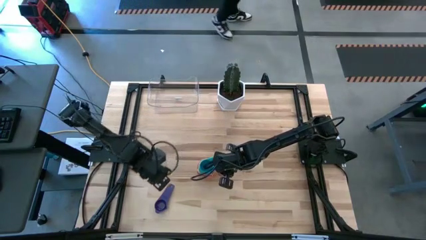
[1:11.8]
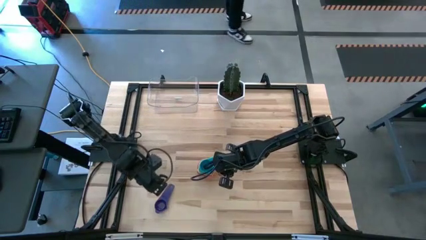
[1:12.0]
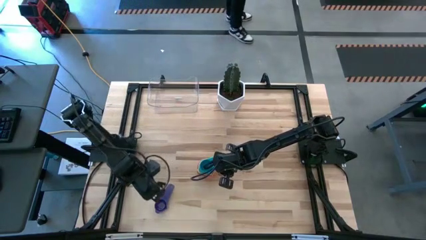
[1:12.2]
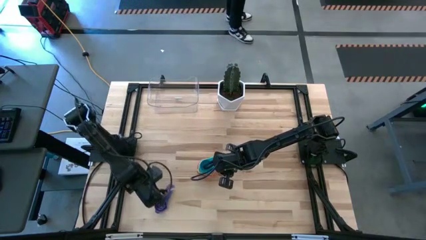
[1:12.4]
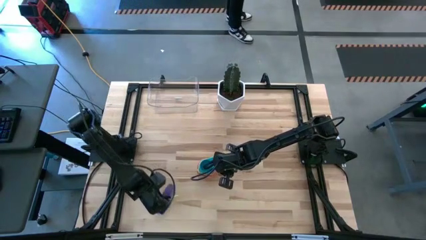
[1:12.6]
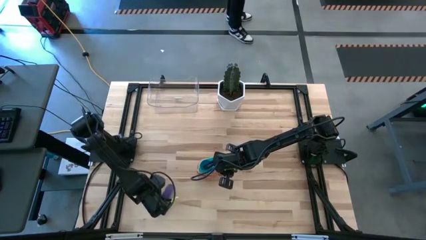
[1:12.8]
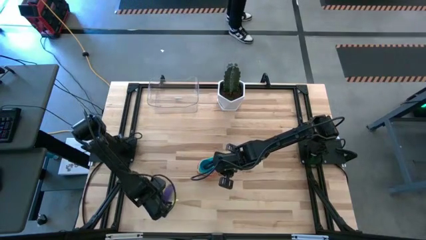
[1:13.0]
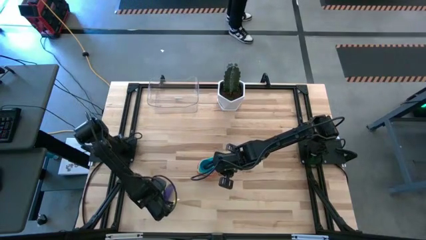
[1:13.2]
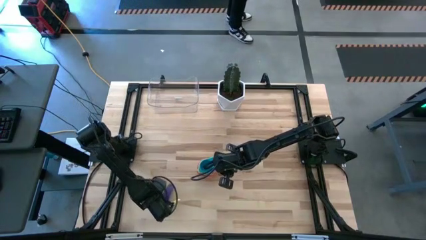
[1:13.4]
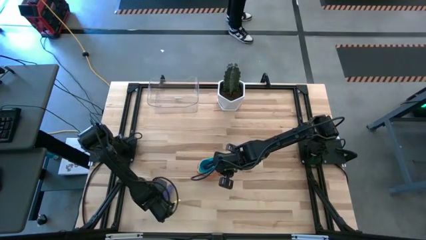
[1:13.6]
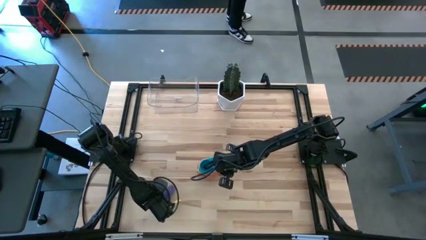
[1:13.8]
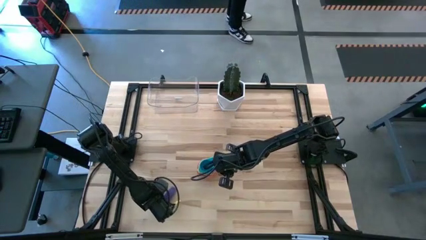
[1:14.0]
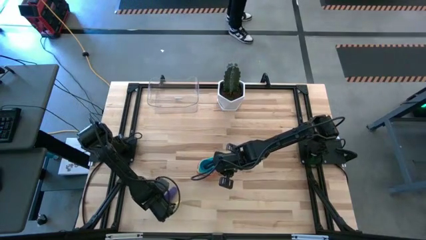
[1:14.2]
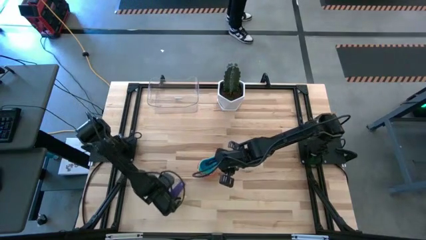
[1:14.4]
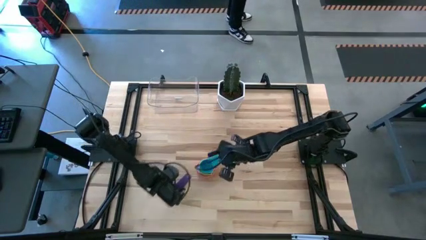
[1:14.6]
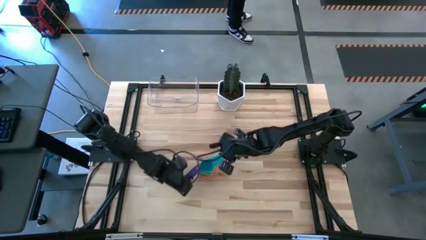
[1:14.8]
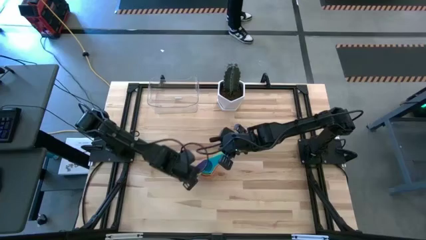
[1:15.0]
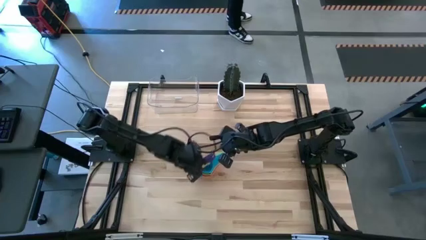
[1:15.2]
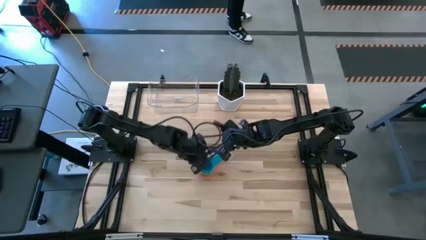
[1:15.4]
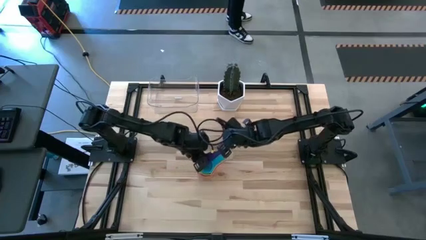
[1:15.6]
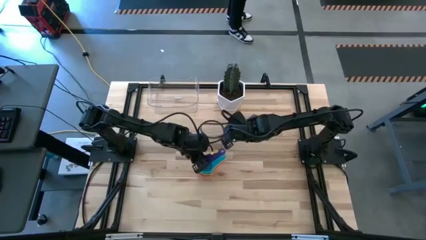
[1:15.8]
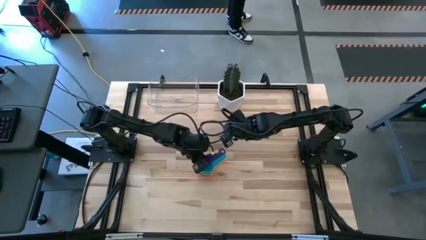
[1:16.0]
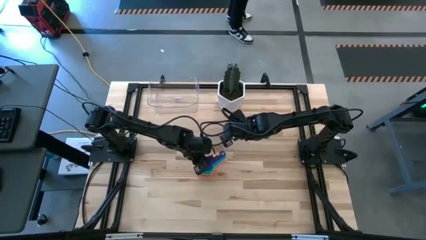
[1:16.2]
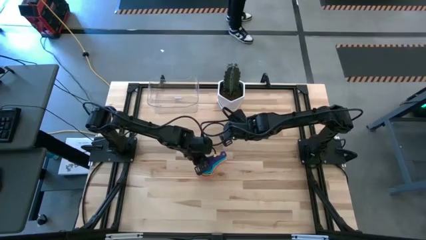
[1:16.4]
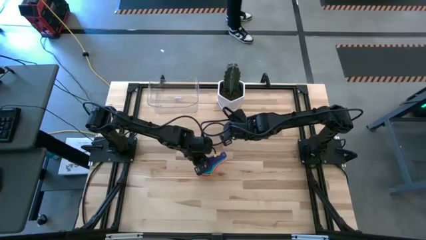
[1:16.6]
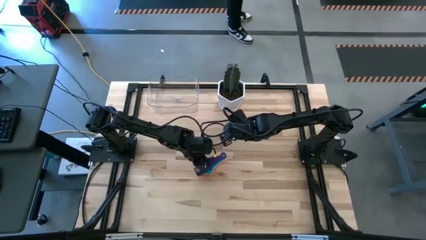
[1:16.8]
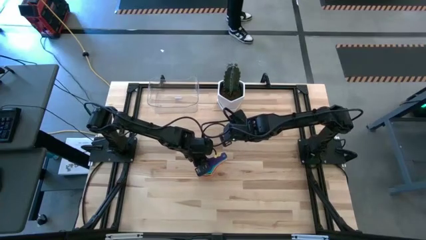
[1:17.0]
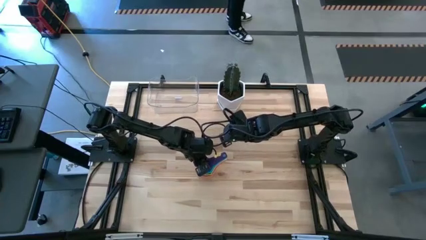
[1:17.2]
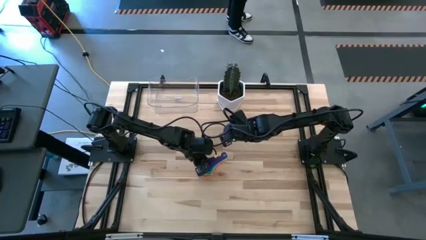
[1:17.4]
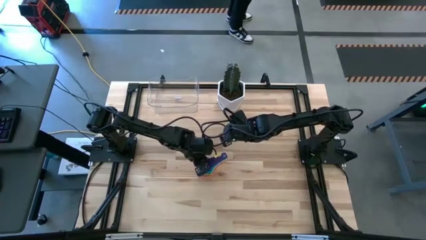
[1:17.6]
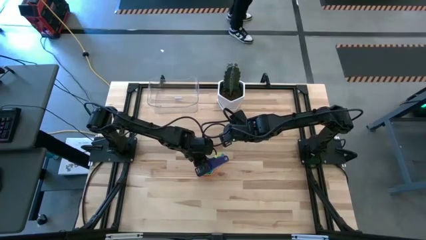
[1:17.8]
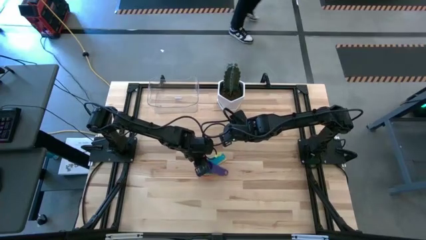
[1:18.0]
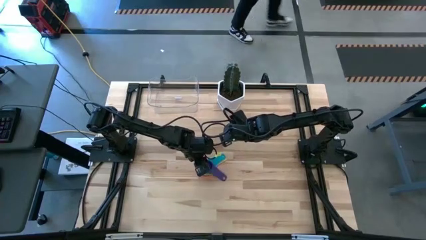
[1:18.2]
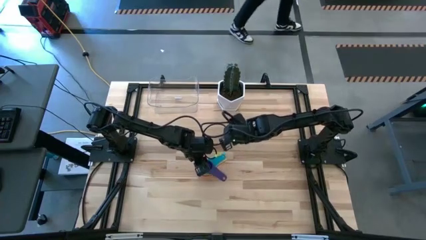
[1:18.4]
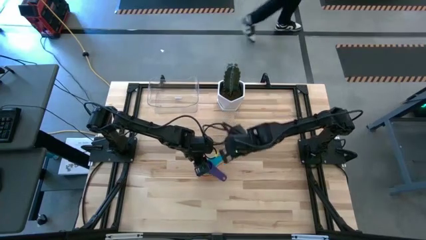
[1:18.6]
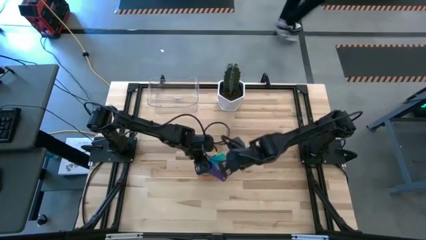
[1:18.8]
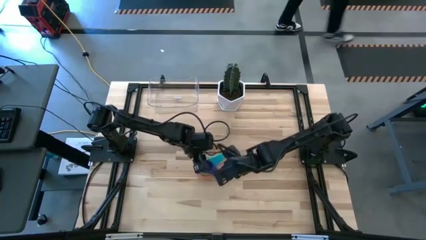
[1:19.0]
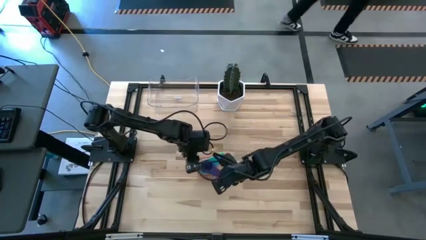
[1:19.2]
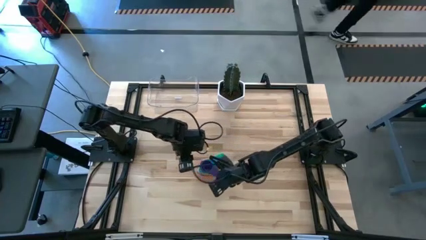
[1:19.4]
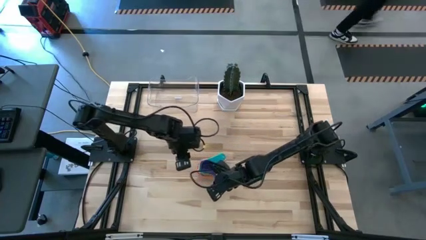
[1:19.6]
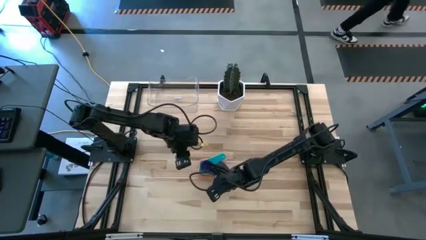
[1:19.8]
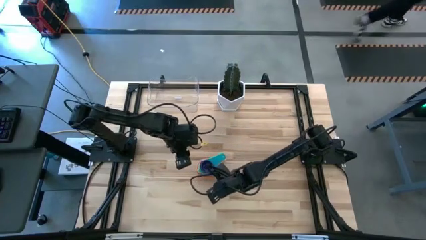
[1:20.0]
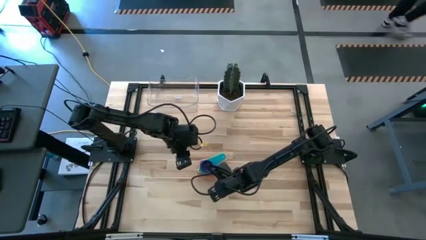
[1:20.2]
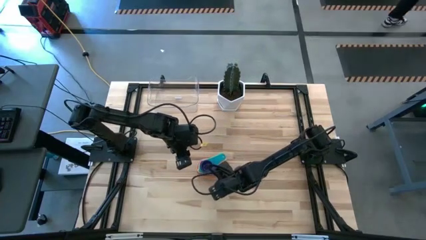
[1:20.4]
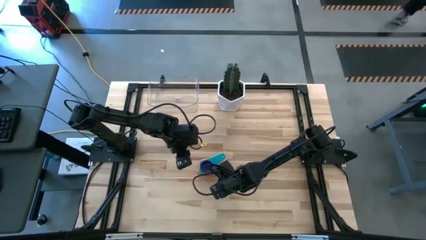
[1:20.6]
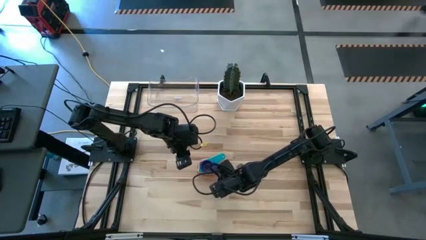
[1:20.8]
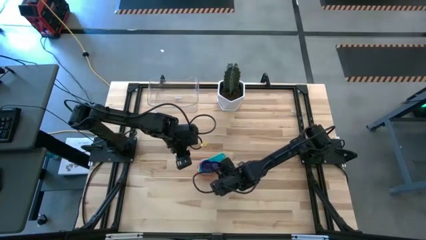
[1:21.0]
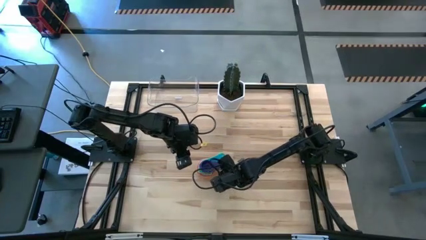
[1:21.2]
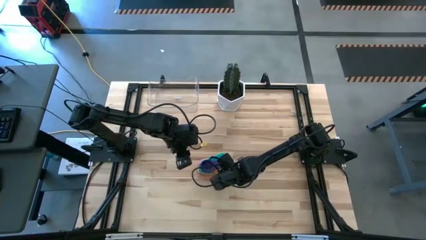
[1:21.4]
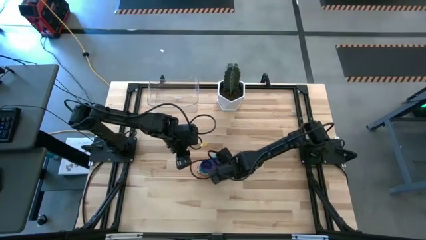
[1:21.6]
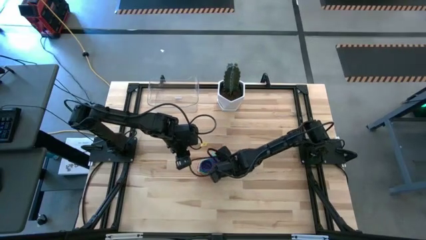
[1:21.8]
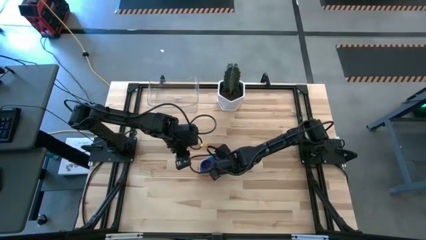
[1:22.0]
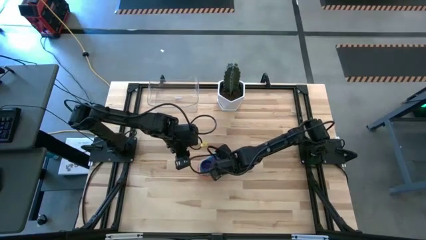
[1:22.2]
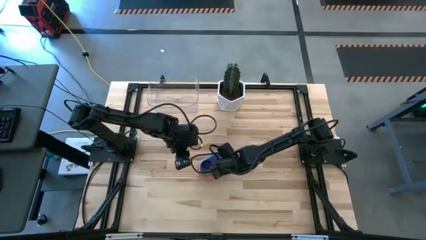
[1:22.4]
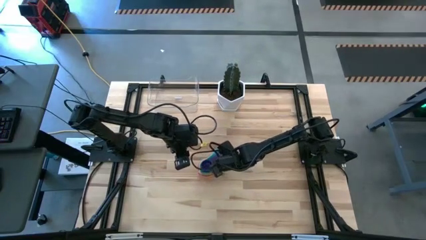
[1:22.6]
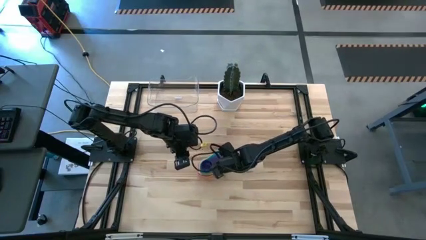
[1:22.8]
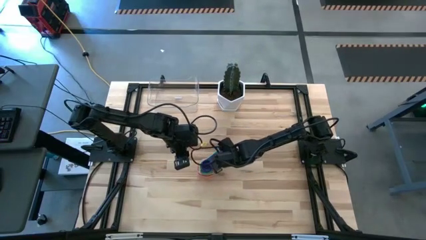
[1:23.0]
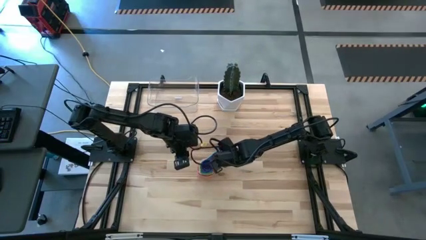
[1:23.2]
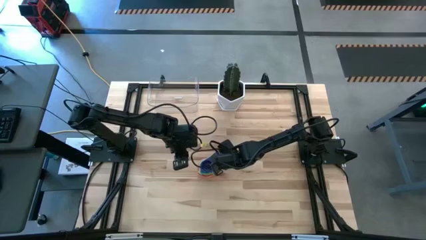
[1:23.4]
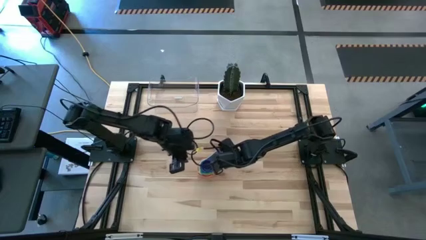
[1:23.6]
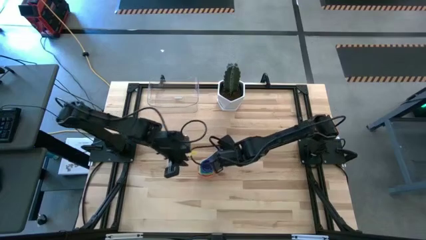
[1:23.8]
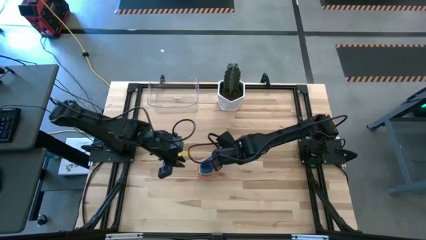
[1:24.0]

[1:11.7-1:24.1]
Task: Nest measuring cups in basket
Stack the small dark blue measuring cup on top of the light blue measuring cup

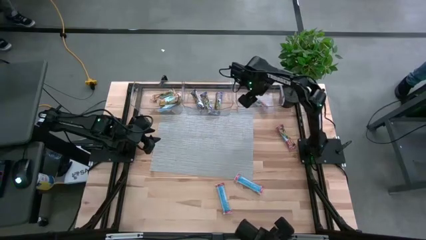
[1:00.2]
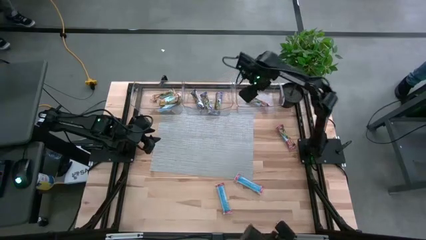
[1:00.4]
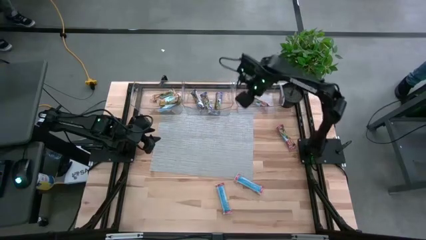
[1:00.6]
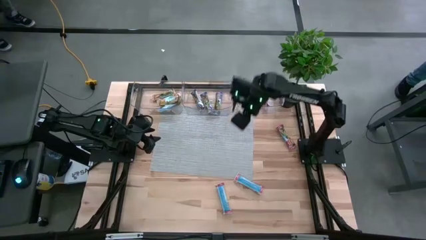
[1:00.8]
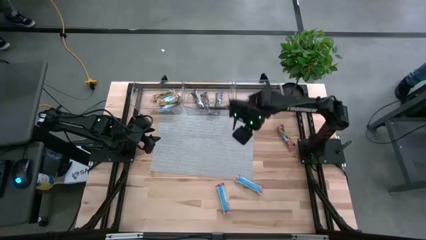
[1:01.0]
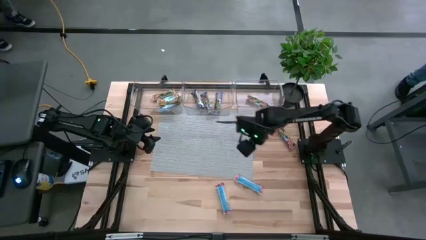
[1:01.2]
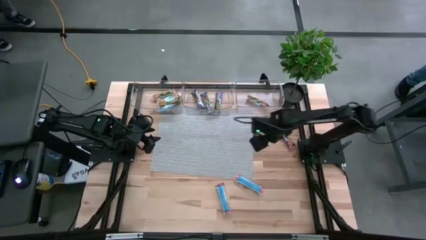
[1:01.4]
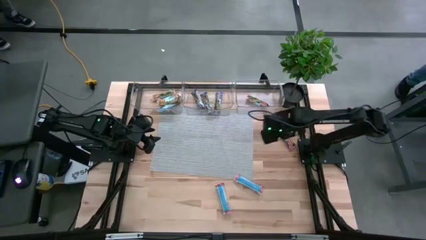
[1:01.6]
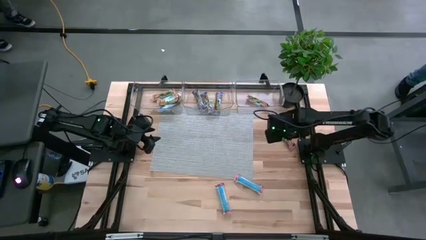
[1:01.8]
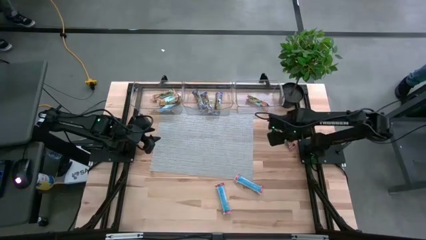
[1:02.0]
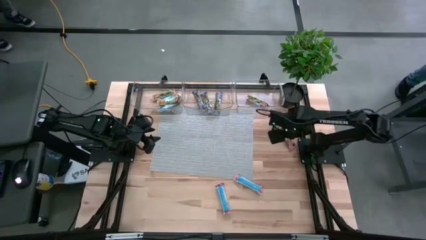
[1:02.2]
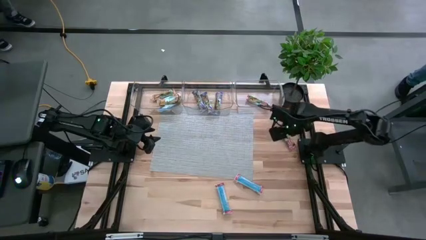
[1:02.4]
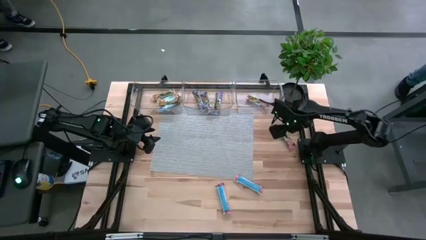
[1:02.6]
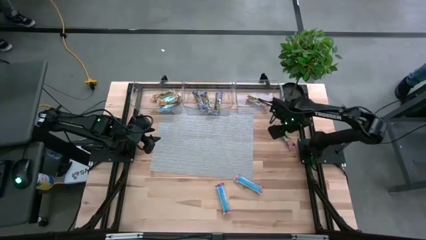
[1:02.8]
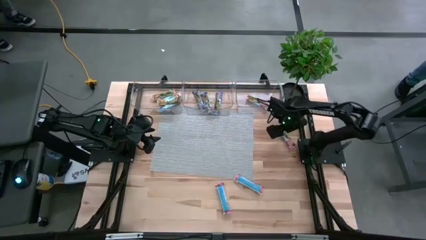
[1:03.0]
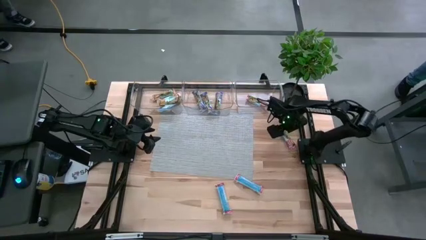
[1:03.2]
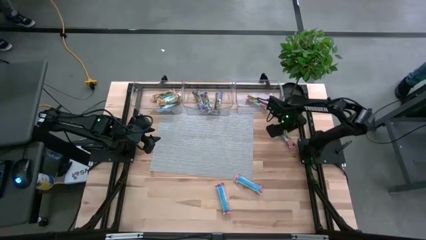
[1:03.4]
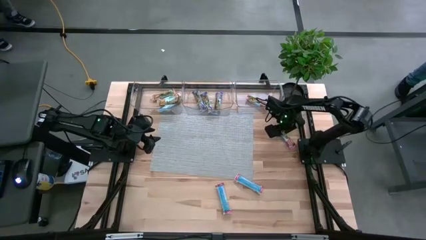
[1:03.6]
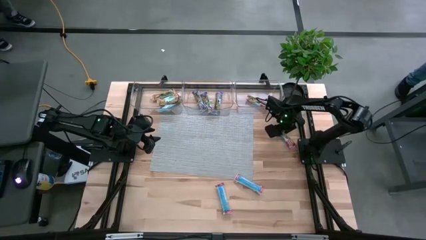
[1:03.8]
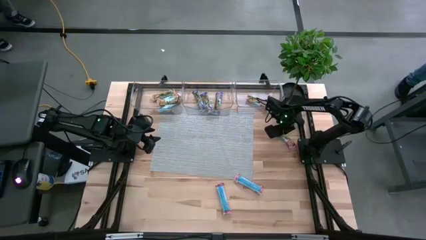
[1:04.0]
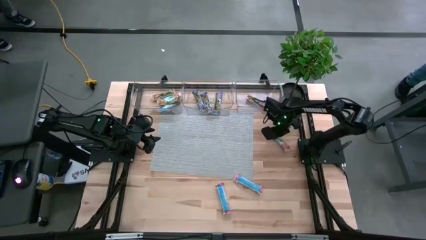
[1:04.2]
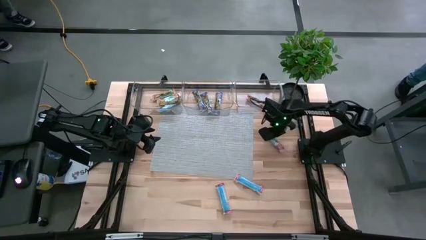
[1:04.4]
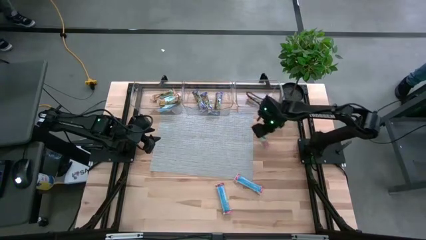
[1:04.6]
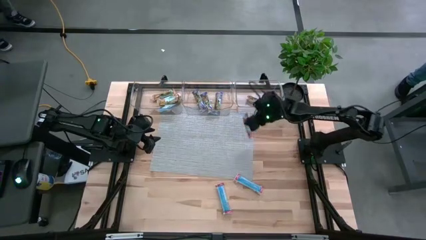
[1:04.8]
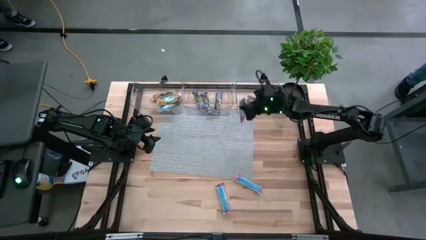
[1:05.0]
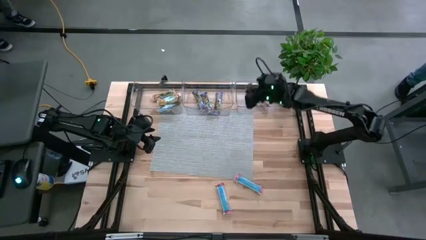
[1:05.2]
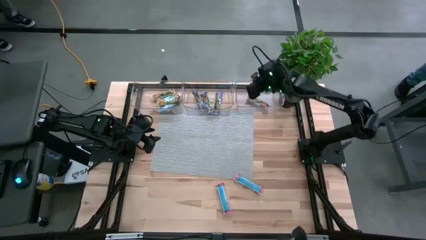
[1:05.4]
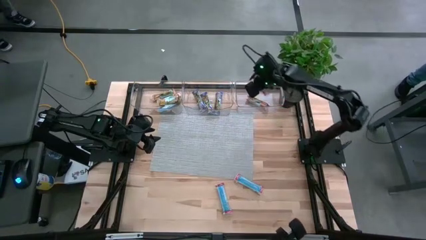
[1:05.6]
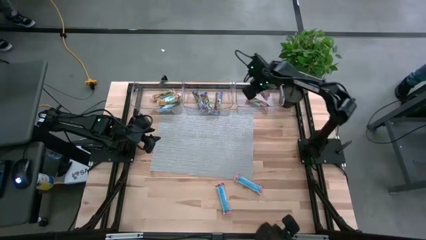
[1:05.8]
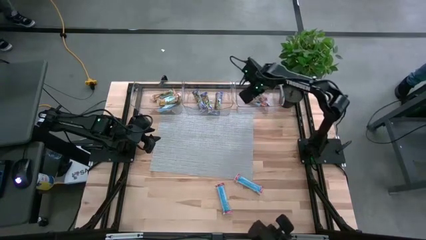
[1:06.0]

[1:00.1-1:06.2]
Task: Pick and place Granola Bars by type
Put the red granola bar into the right transparent bin
